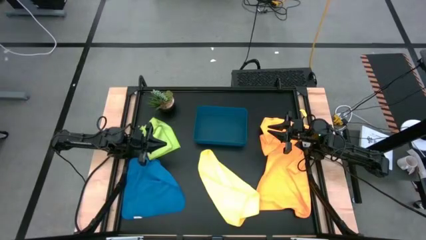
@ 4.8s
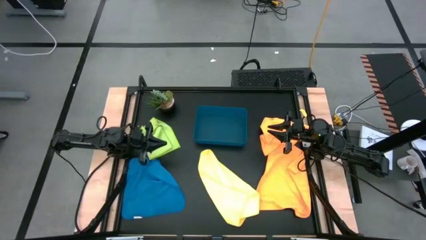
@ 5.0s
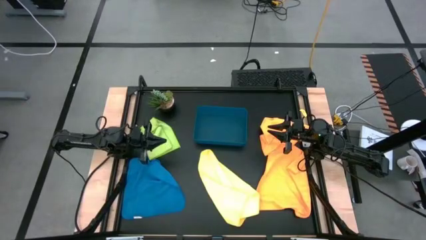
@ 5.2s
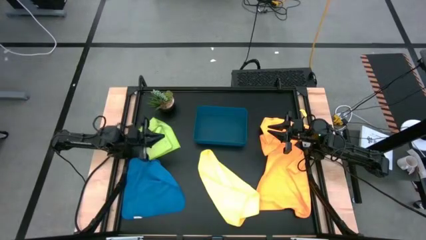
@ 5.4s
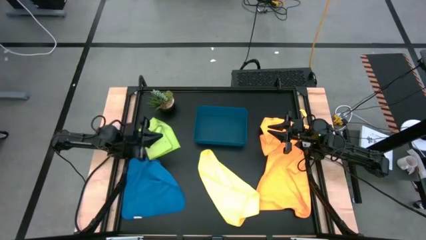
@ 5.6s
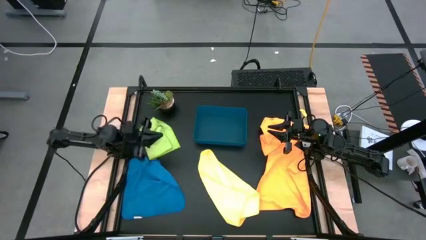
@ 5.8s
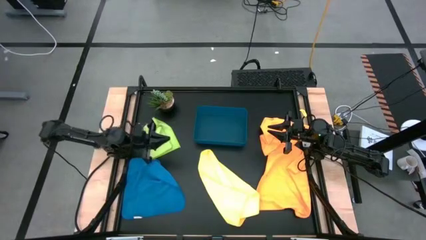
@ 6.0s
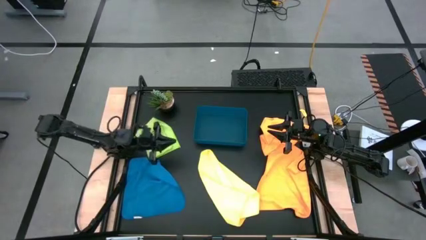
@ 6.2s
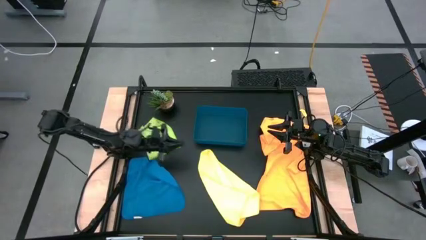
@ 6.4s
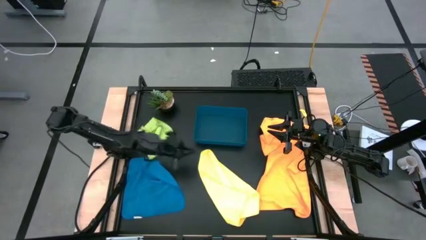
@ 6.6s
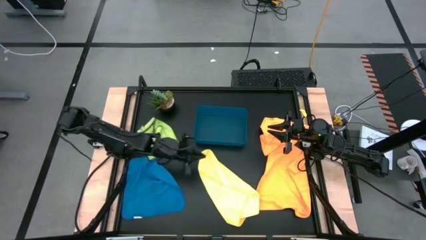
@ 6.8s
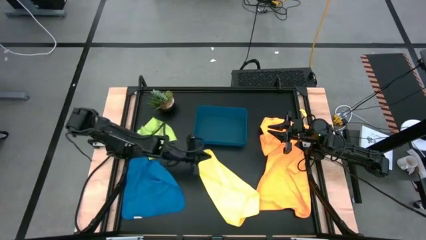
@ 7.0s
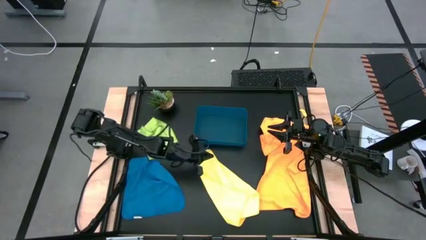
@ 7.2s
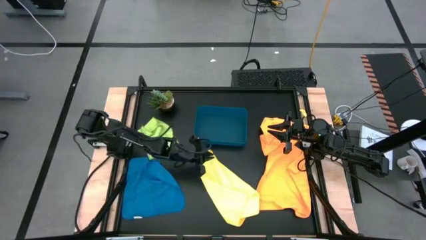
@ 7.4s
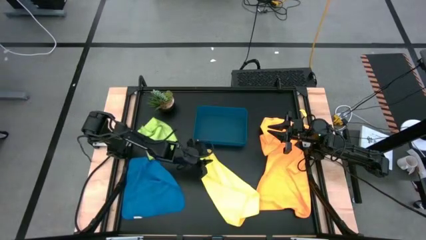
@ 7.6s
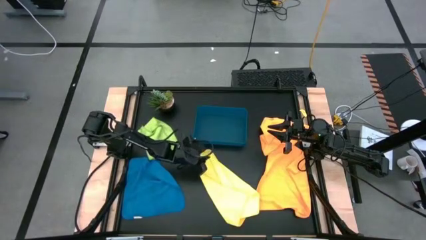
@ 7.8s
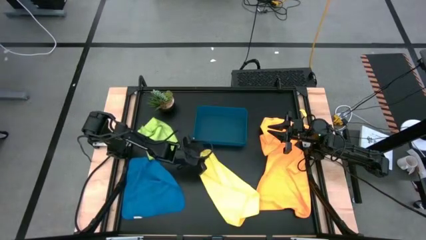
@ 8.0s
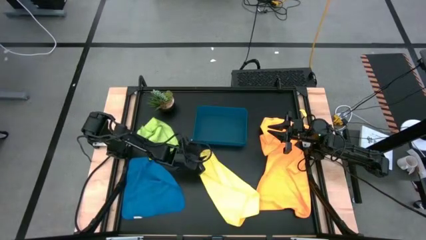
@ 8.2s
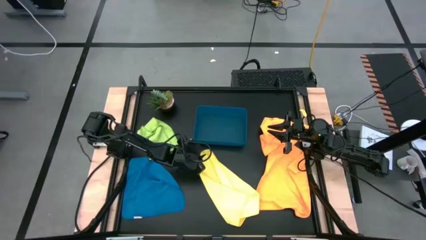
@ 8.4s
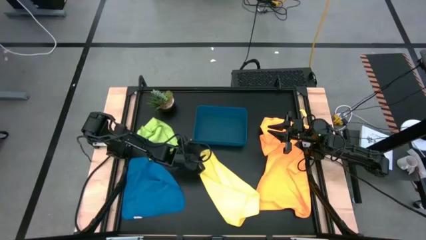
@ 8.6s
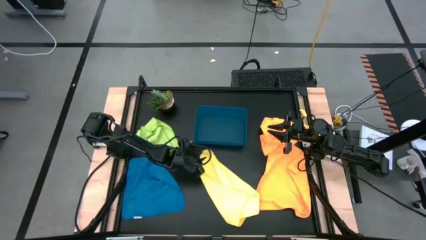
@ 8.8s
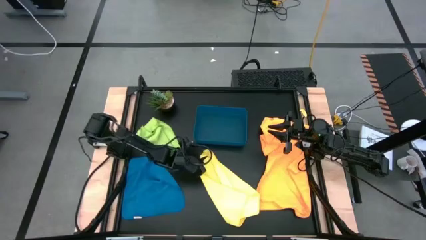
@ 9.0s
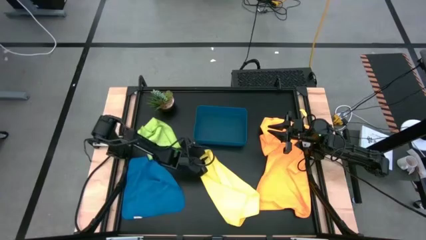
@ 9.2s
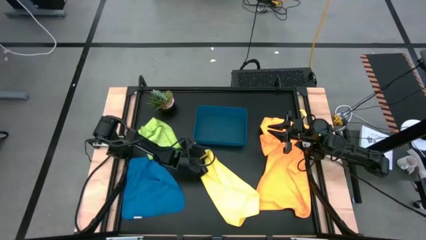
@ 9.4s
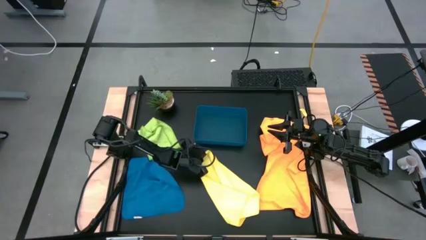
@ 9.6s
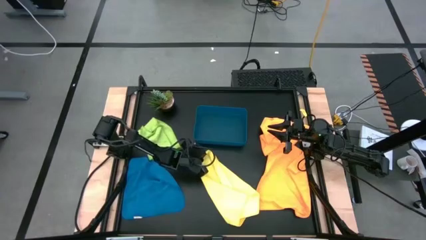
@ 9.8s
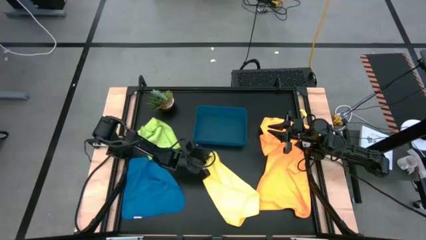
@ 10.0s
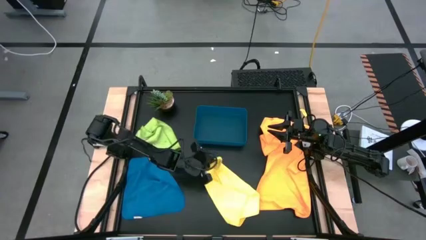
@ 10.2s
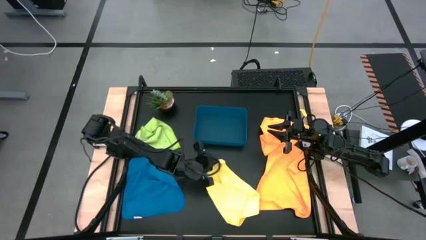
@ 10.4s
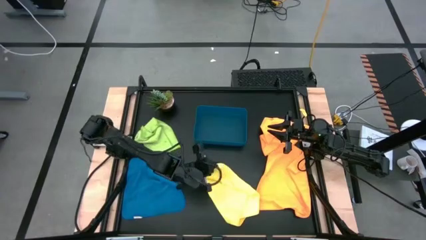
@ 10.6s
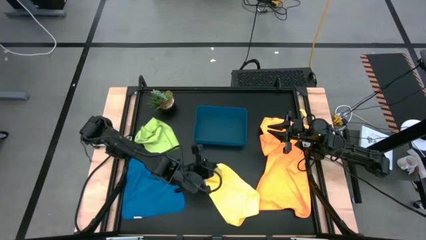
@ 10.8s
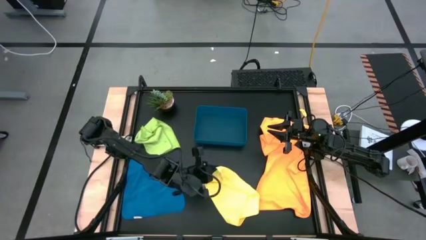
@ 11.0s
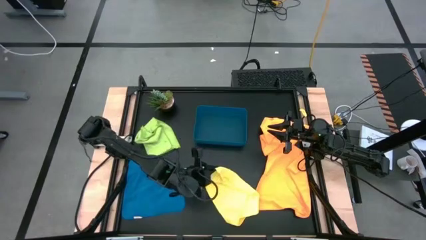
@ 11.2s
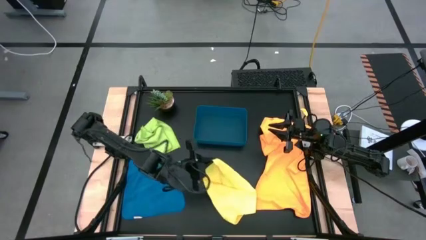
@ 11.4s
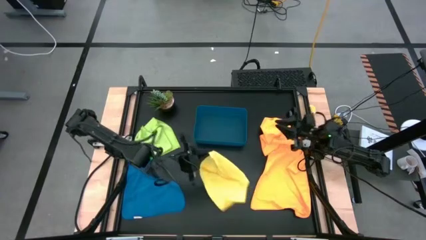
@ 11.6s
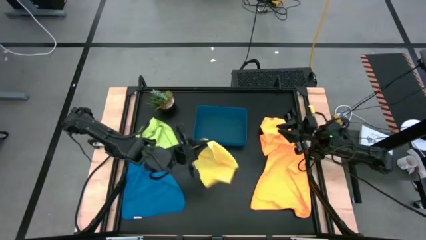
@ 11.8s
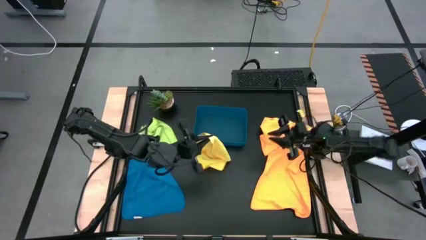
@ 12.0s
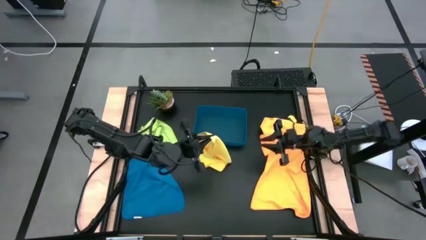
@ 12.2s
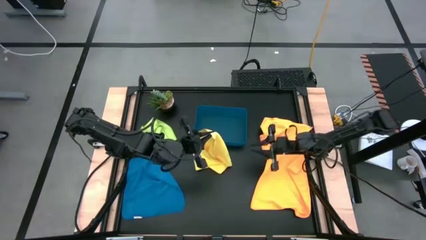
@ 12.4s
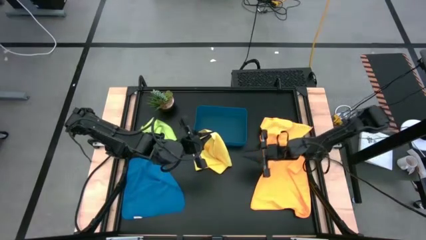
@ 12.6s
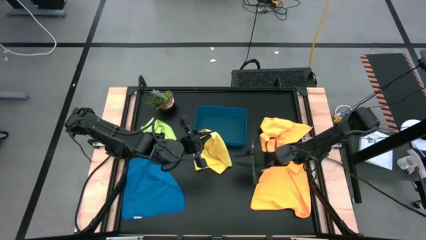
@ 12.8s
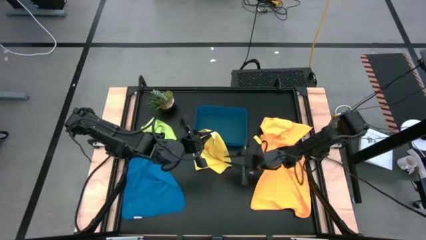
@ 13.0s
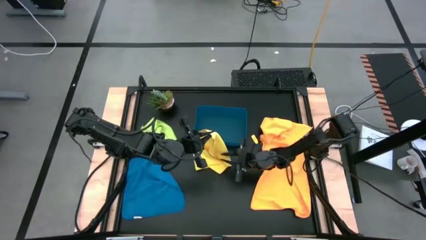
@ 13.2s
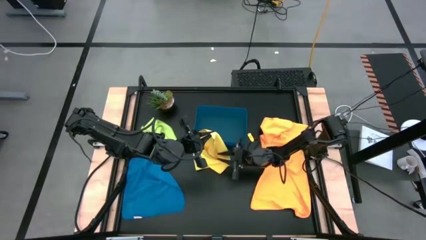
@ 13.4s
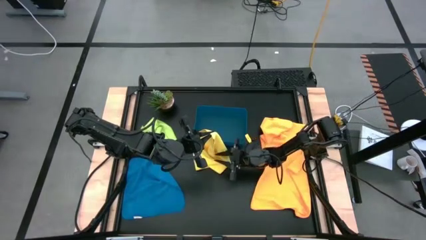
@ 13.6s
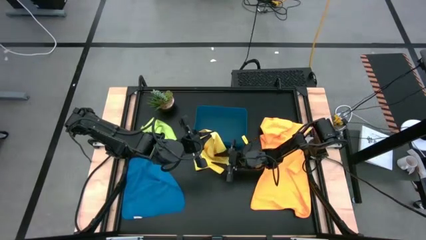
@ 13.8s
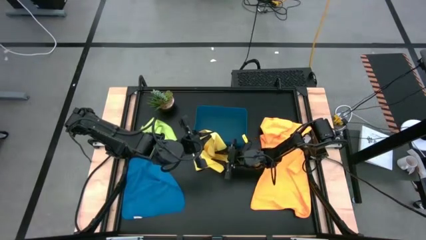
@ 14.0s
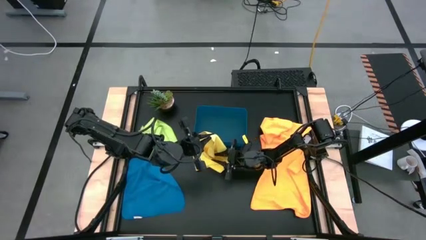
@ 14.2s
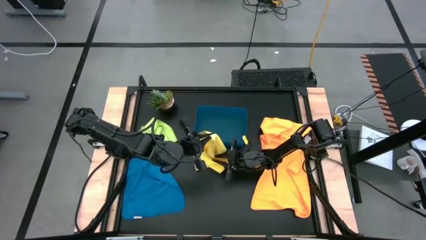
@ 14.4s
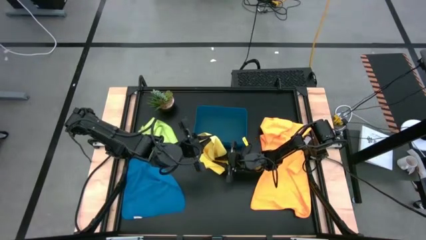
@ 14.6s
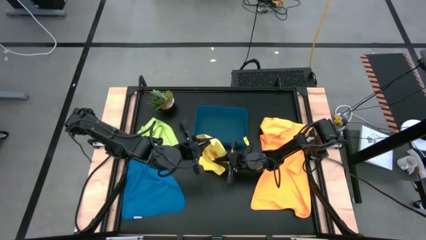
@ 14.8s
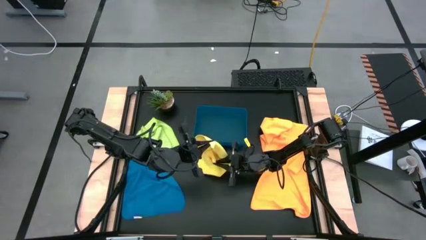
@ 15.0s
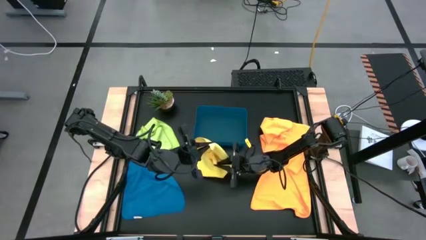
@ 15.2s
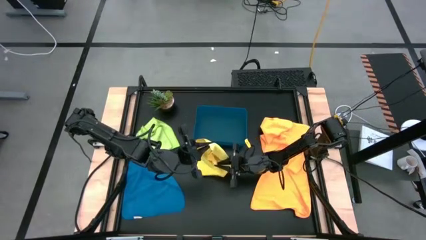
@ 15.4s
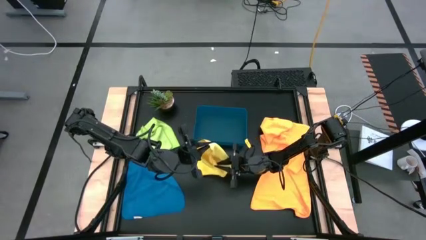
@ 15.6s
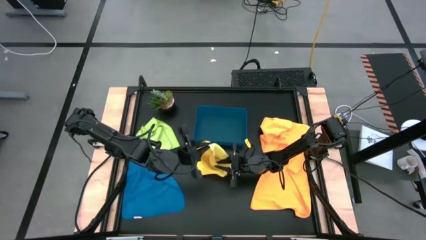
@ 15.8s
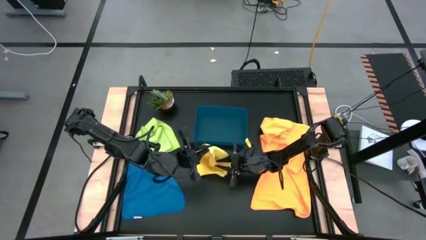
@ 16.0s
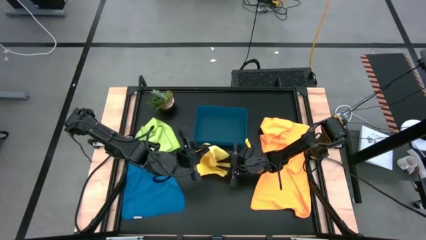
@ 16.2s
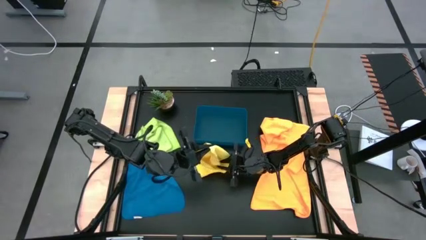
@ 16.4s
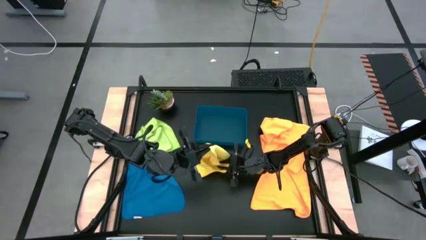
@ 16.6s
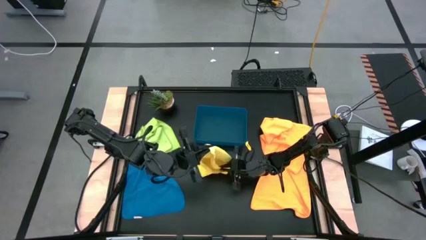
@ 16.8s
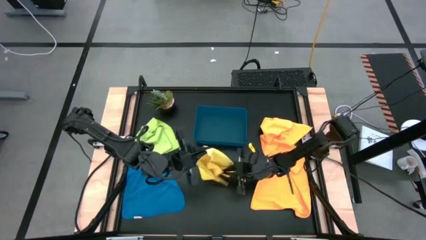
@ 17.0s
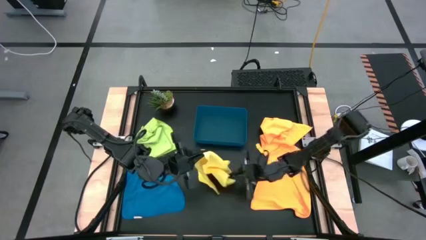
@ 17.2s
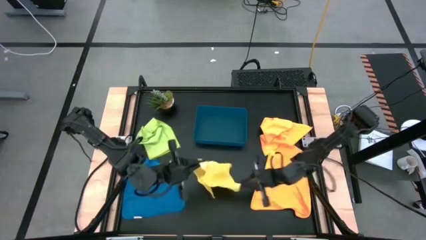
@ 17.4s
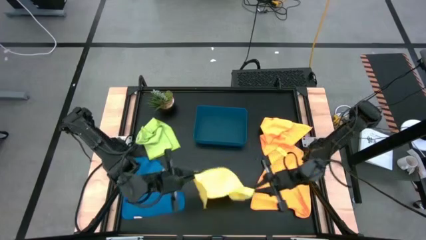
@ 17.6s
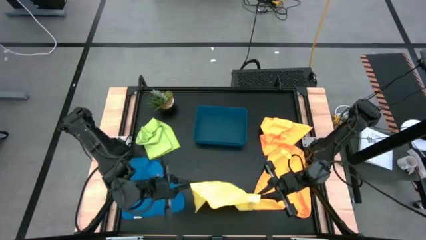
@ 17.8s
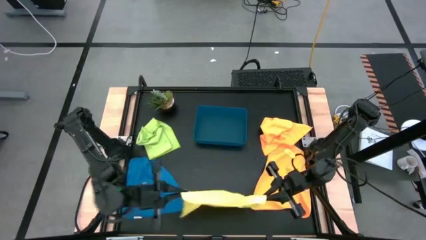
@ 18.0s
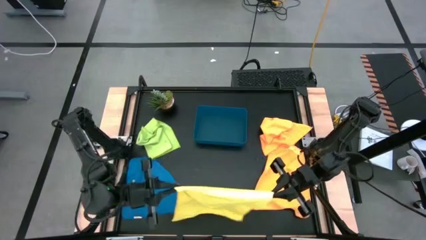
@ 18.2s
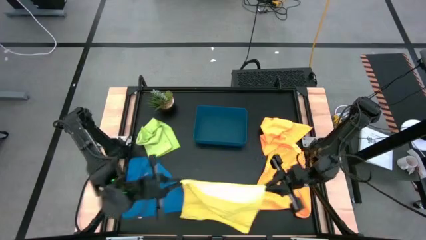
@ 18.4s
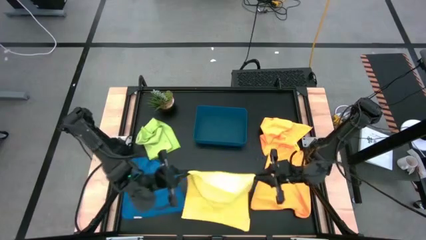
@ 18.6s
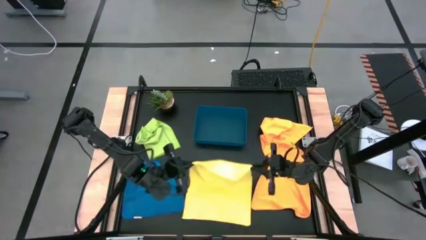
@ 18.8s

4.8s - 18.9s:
Task: Fold microfiber towels
Fold the yellow microfiber cloth
